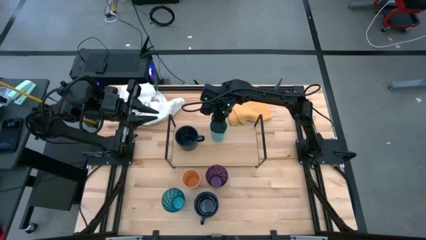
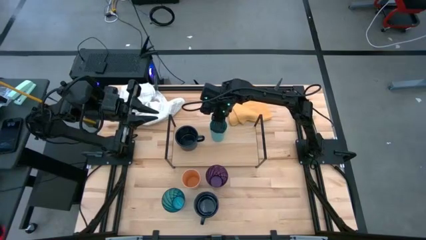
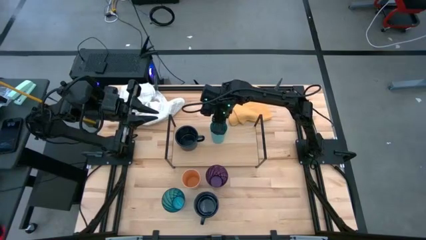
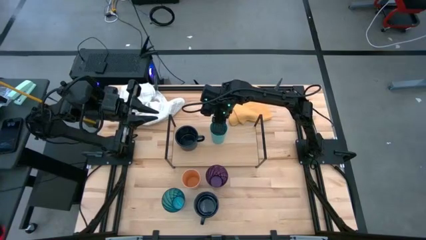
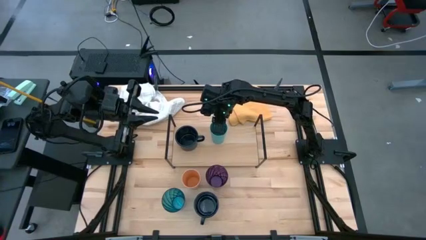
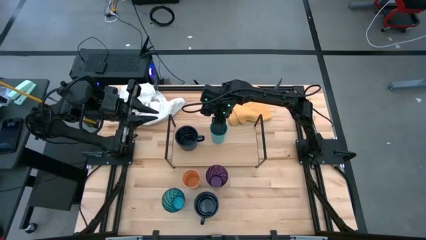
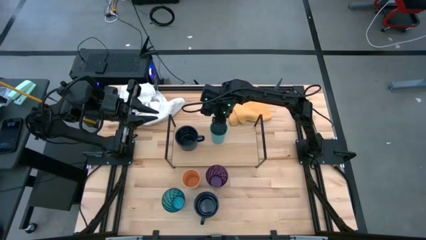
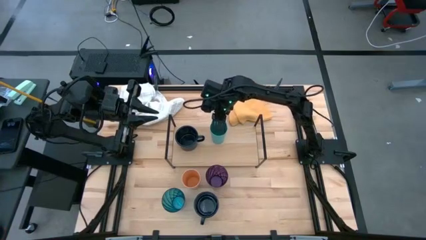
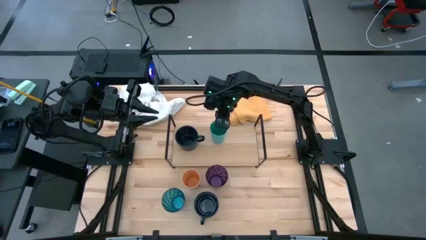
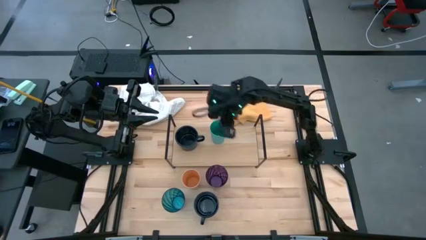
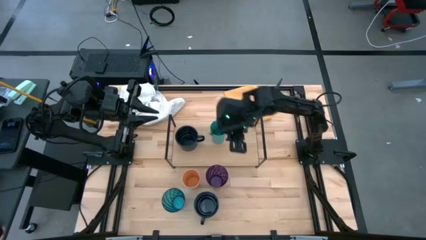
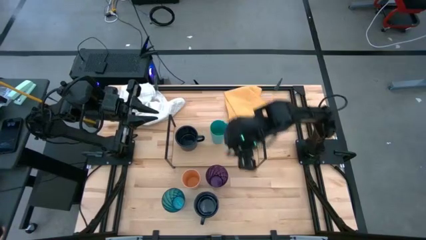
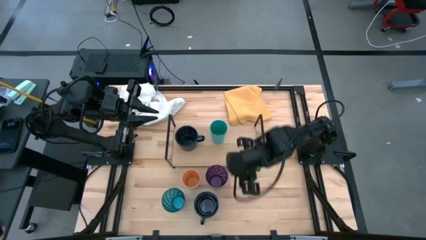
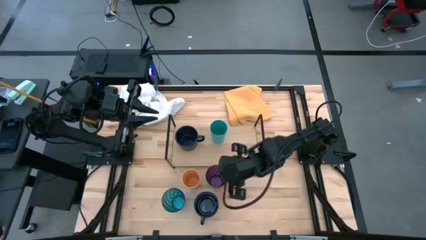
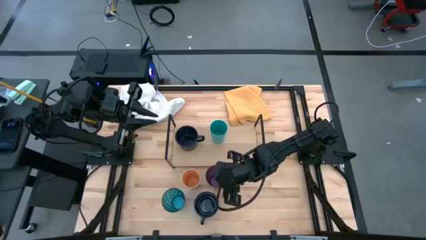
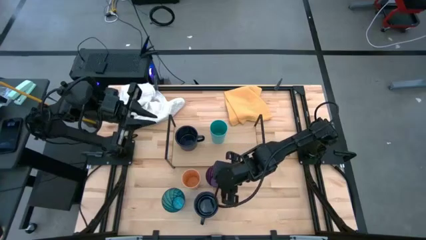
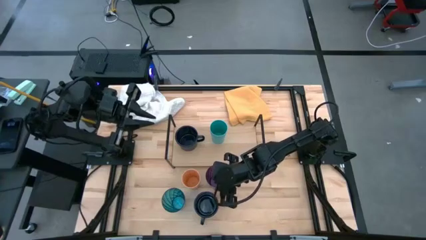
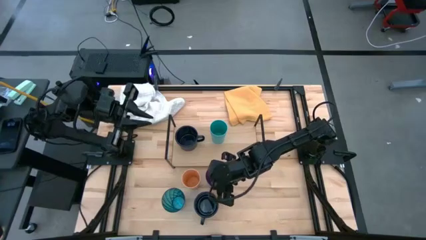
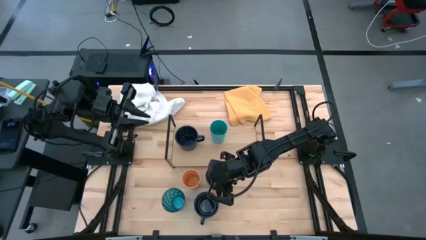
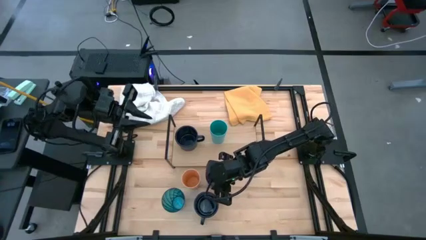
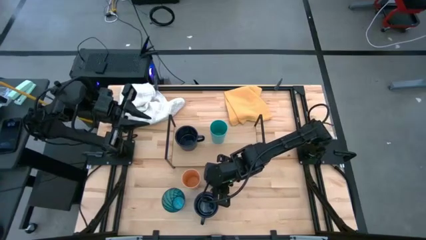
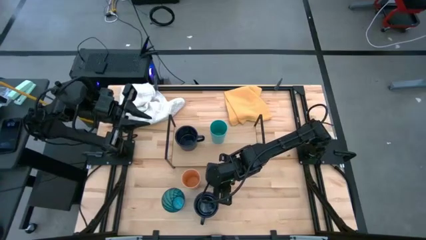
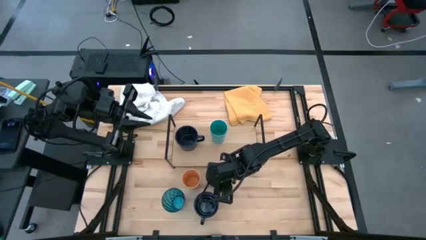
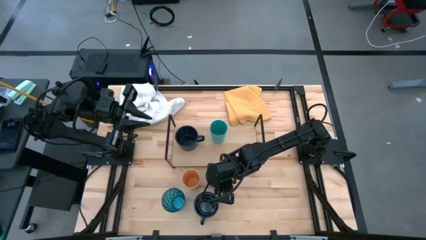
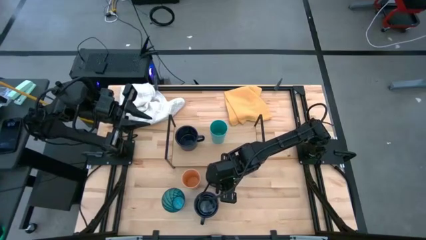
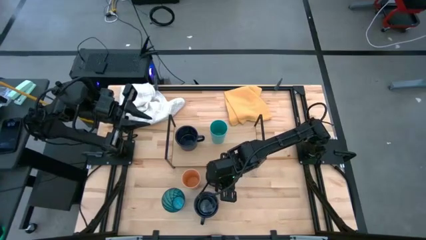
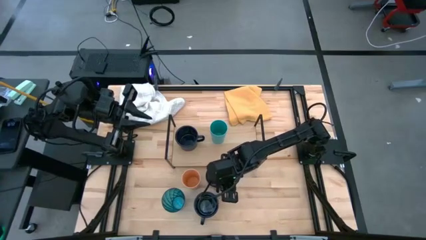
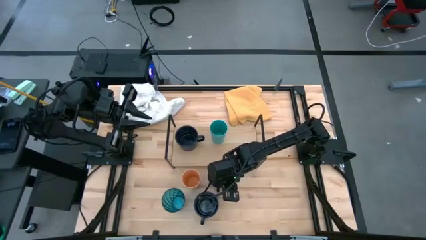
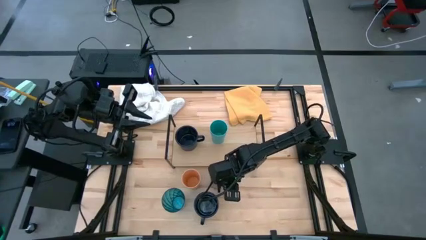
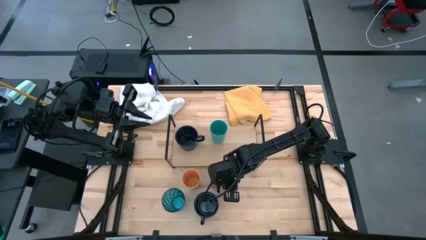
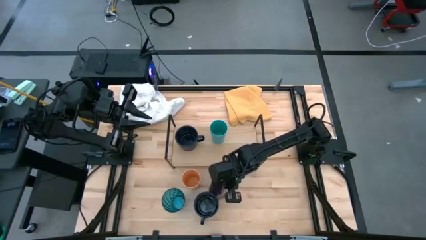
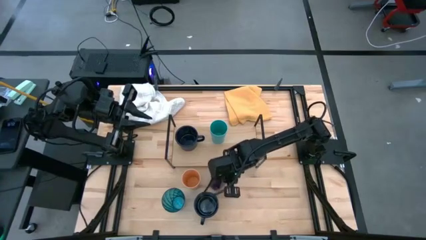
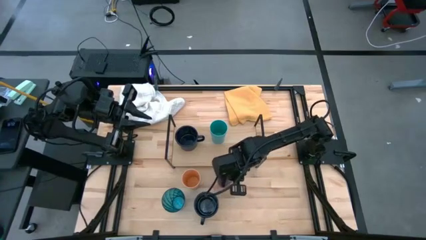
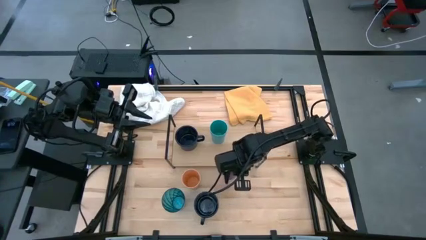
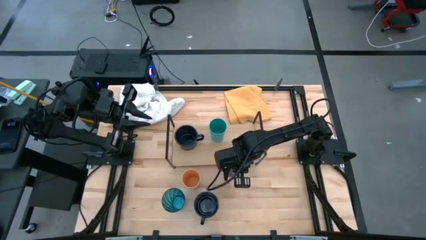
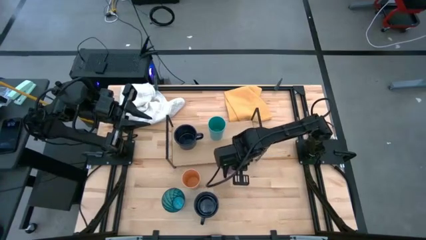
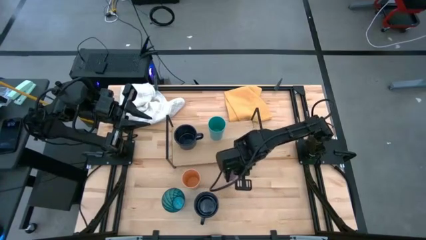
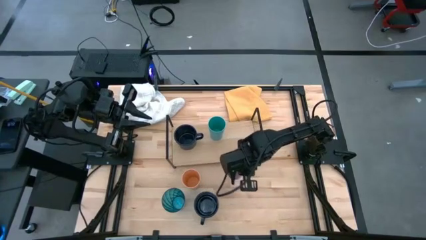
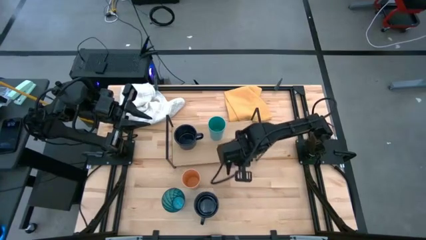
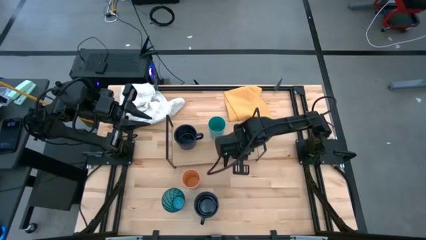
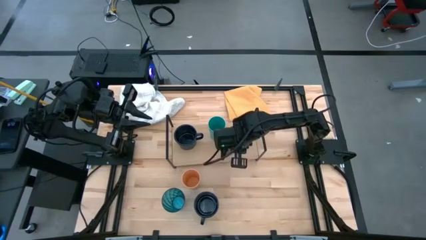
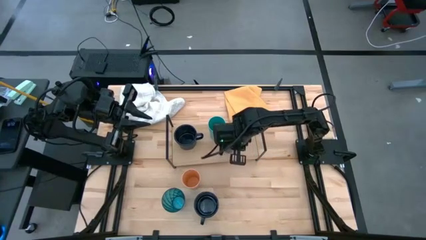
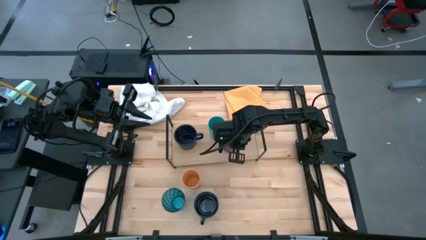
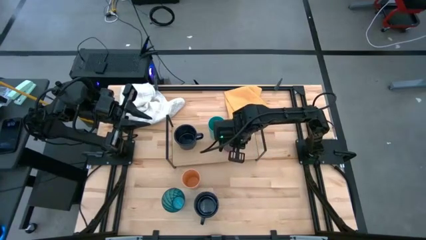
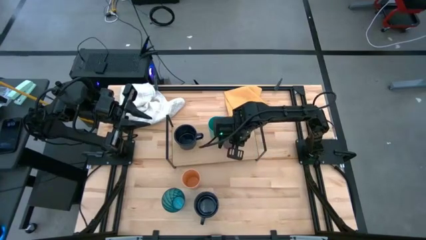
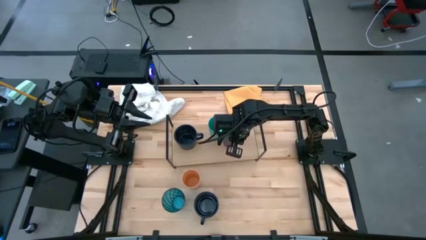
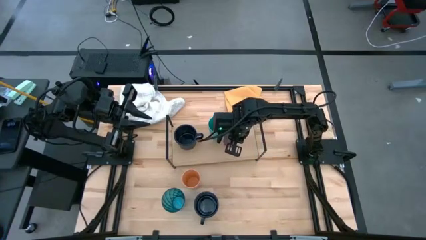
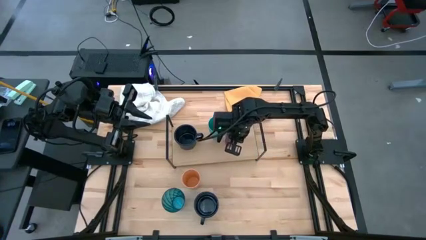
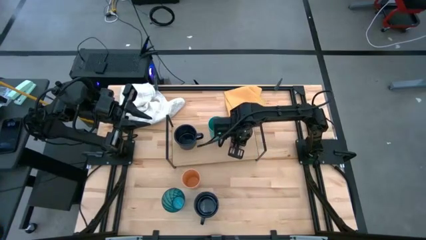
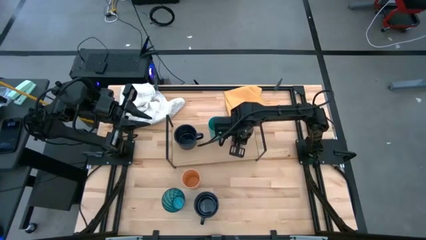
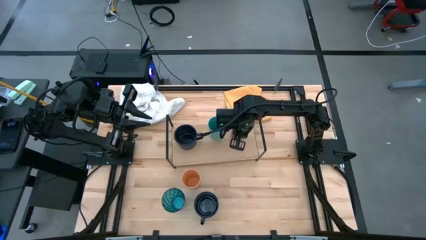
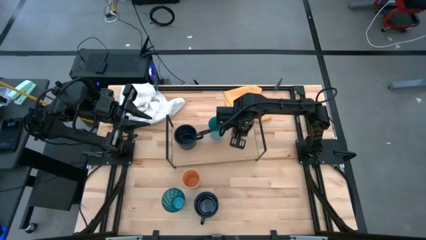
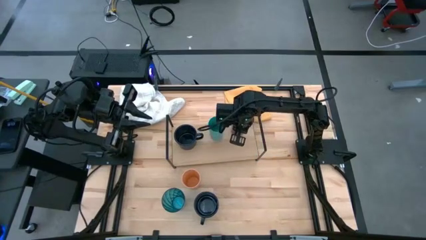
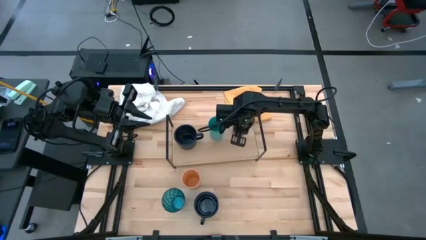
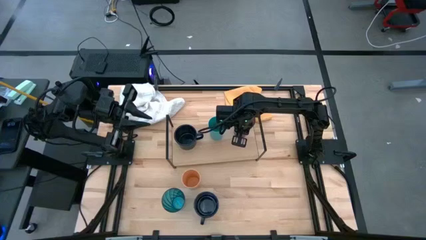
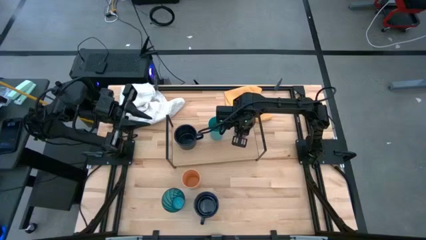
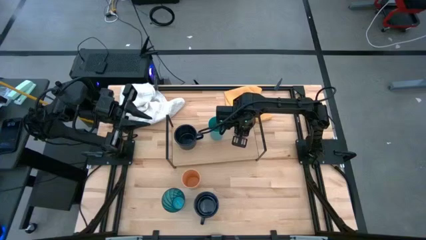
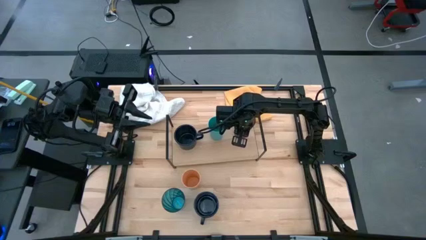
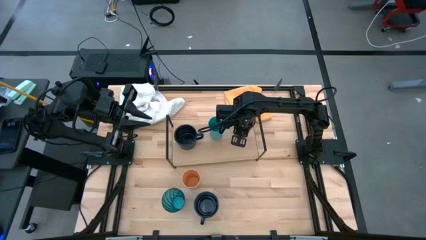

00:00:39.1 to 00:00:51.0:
Task: Stack small to large cups/mugs on shelf
Put the violet cup on the shelf
